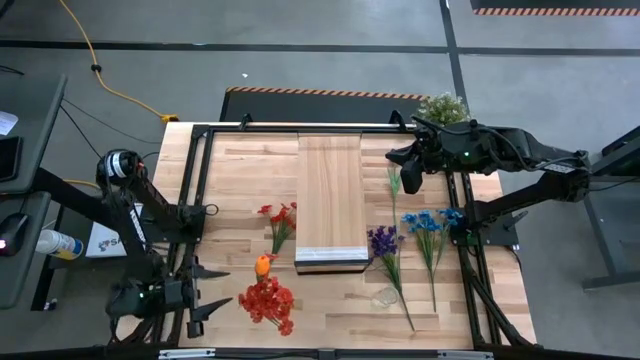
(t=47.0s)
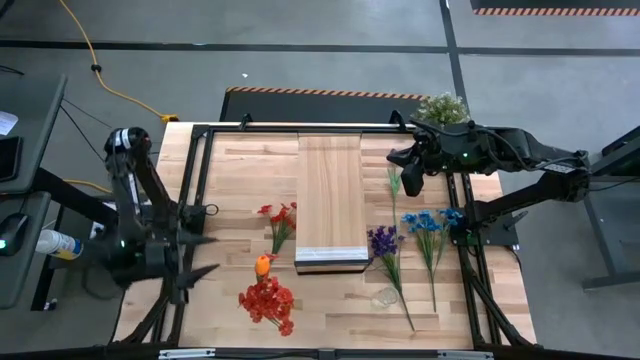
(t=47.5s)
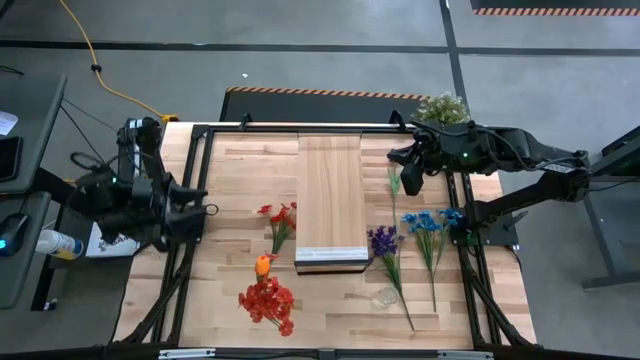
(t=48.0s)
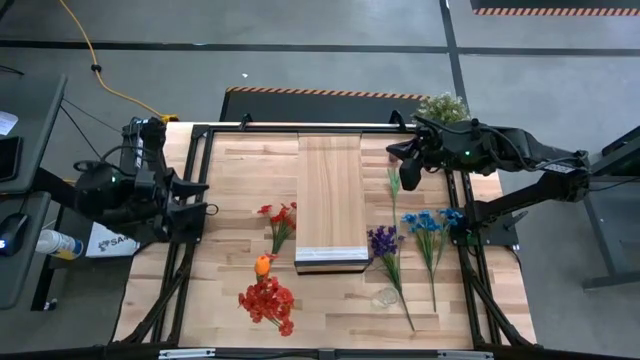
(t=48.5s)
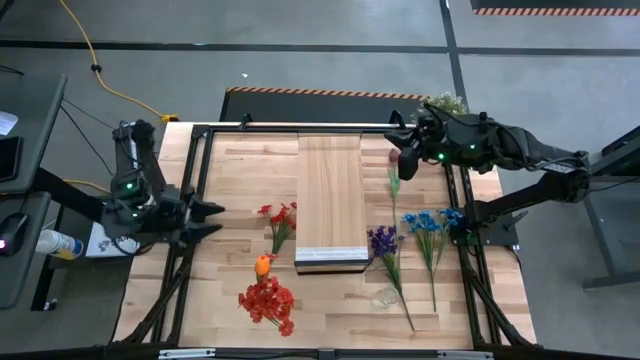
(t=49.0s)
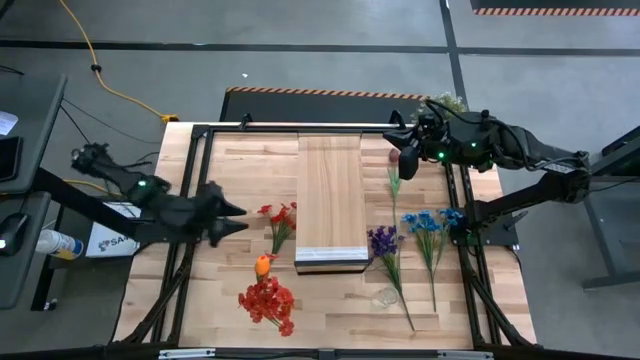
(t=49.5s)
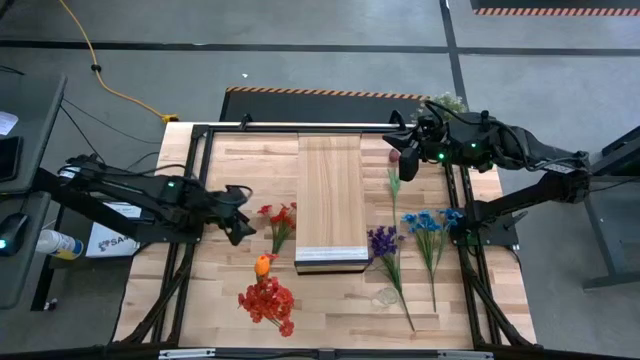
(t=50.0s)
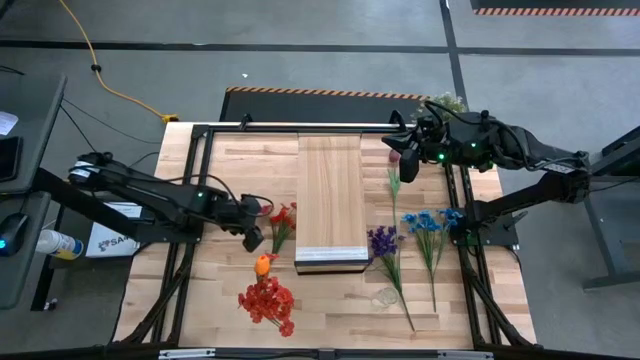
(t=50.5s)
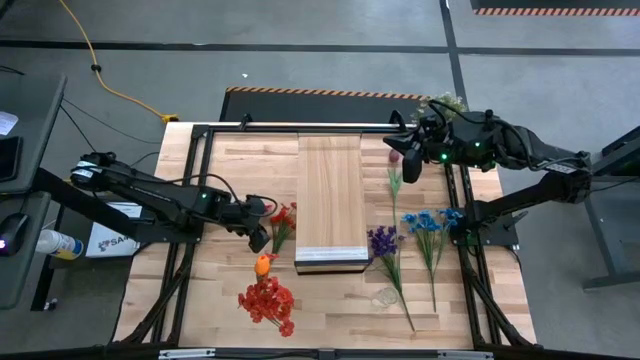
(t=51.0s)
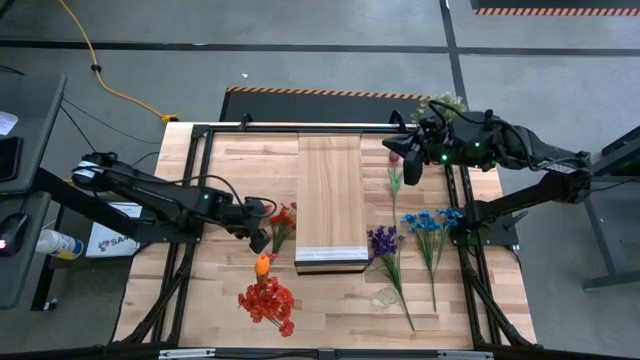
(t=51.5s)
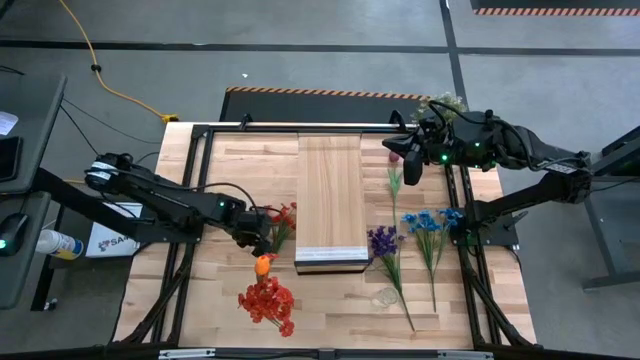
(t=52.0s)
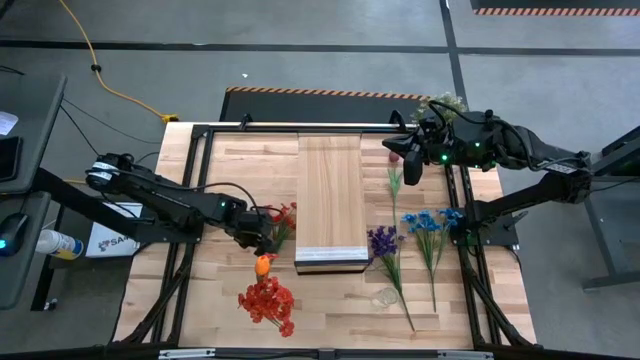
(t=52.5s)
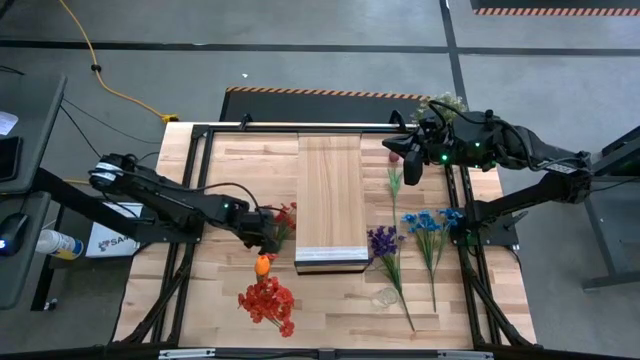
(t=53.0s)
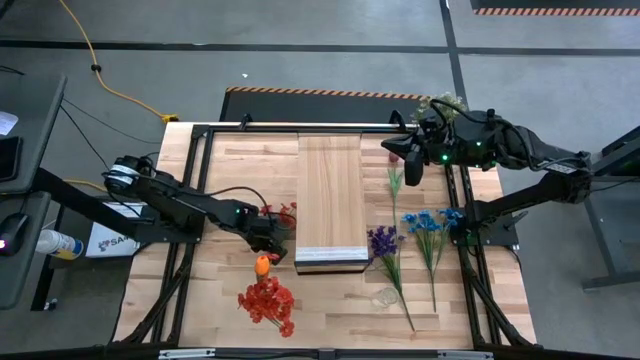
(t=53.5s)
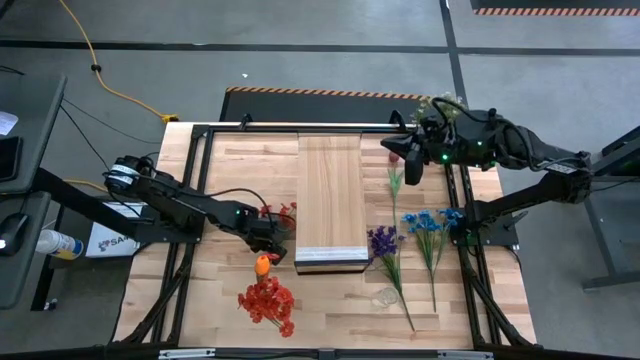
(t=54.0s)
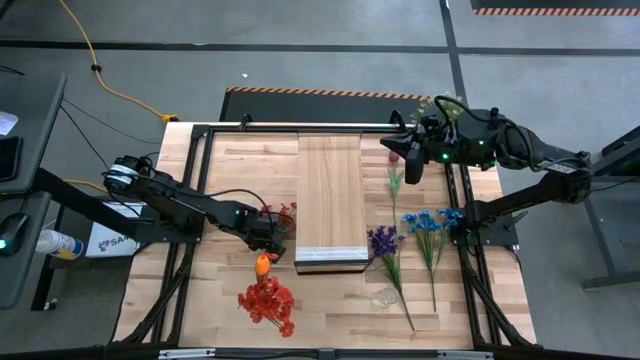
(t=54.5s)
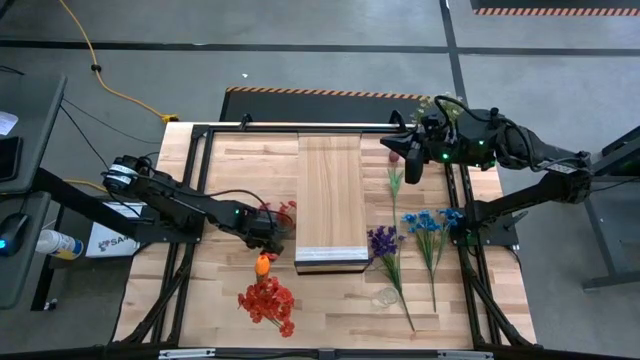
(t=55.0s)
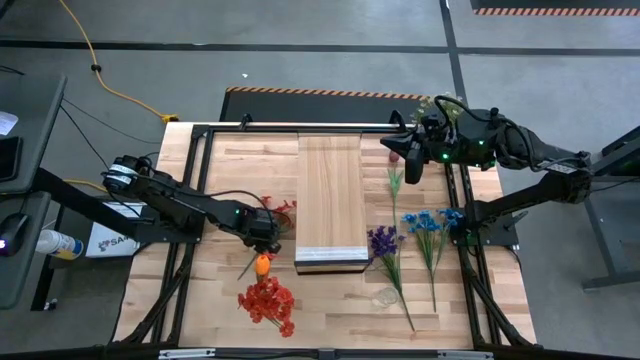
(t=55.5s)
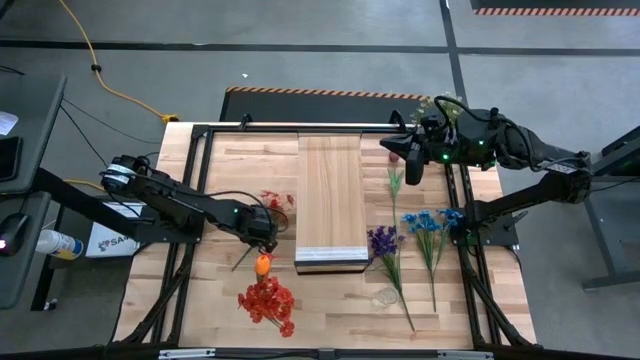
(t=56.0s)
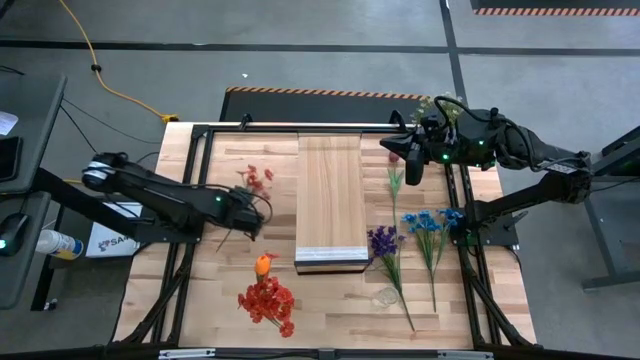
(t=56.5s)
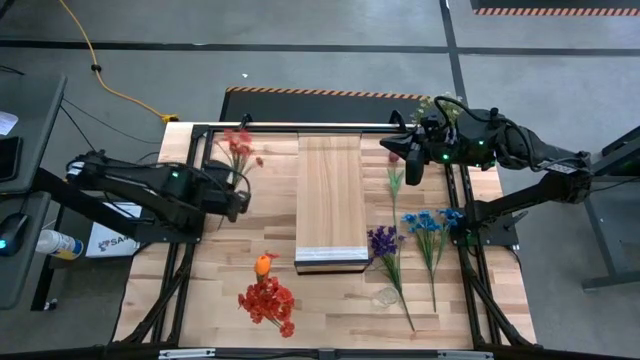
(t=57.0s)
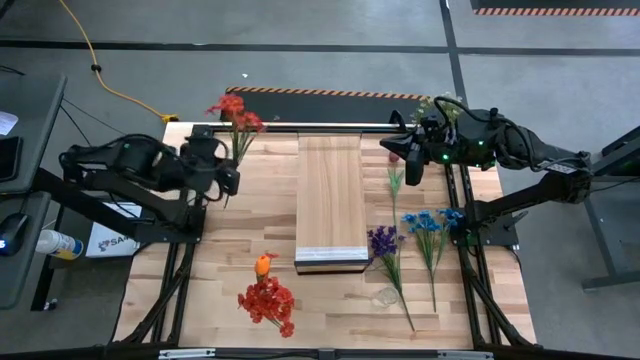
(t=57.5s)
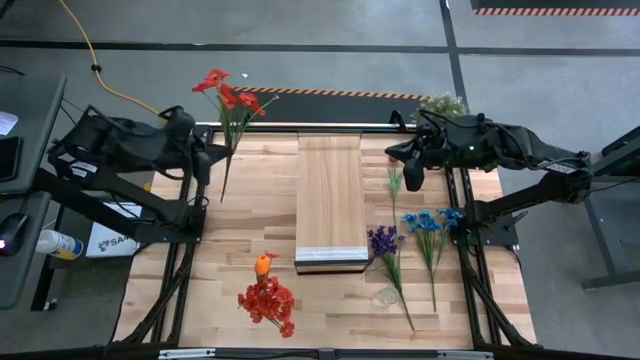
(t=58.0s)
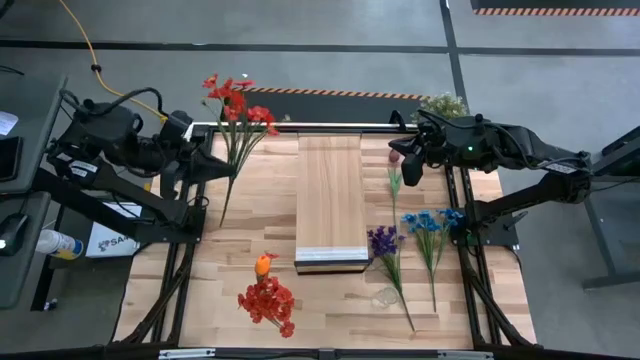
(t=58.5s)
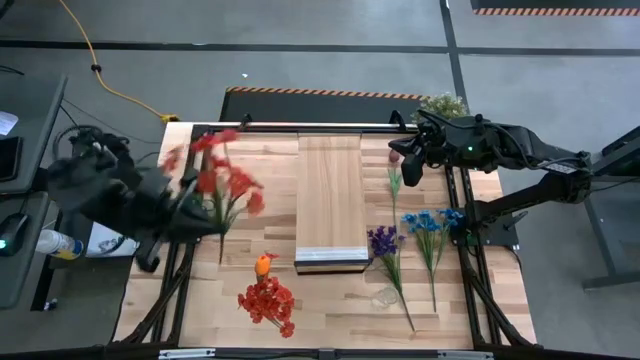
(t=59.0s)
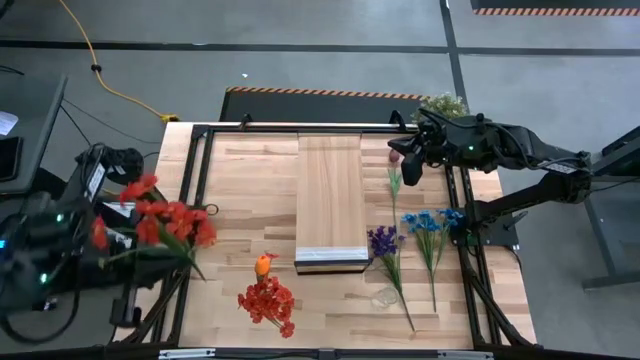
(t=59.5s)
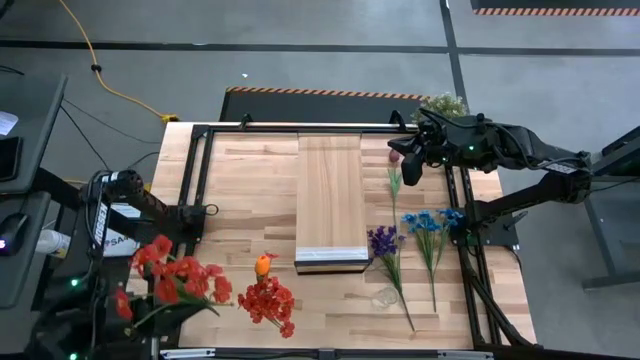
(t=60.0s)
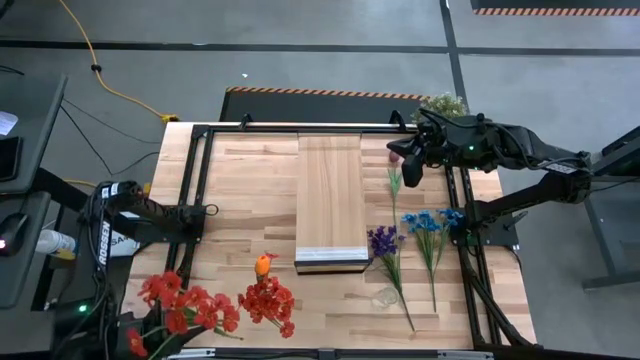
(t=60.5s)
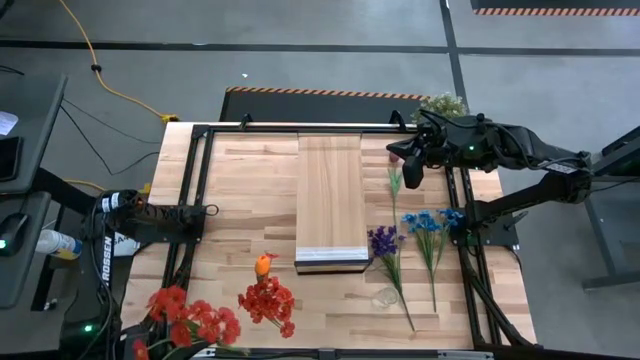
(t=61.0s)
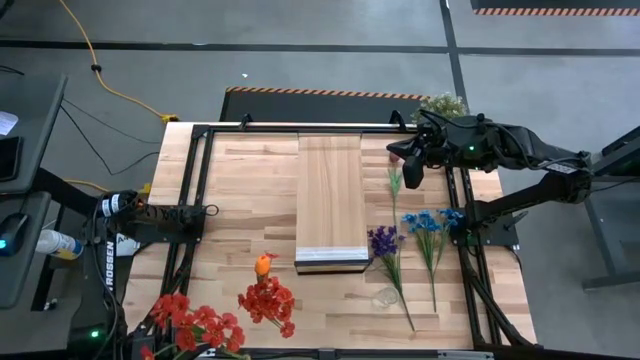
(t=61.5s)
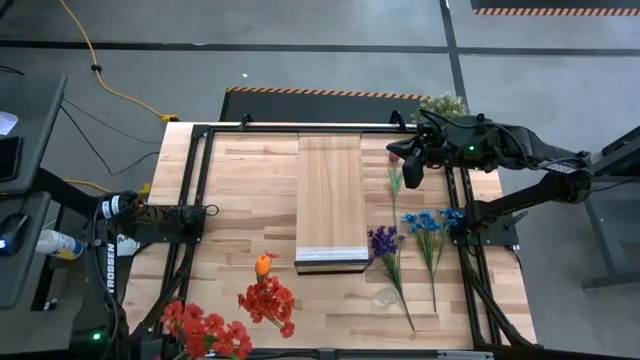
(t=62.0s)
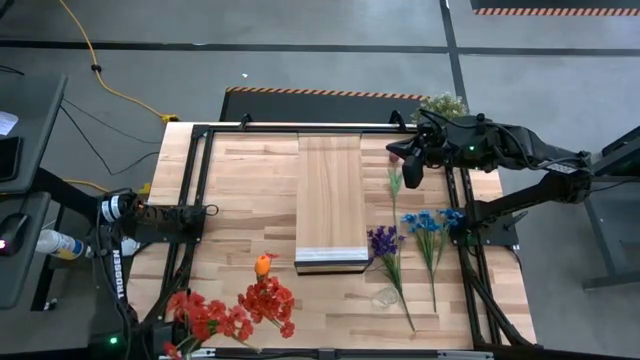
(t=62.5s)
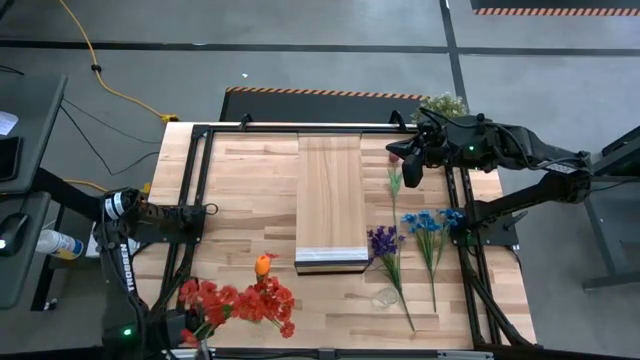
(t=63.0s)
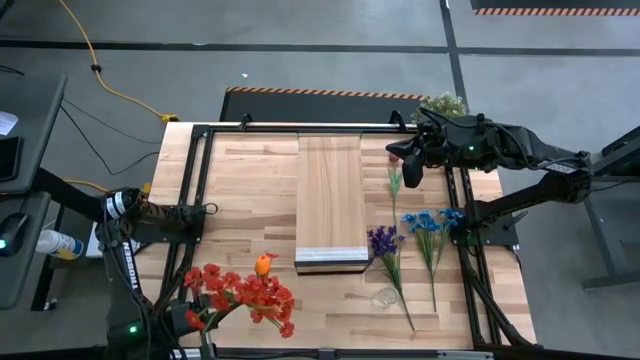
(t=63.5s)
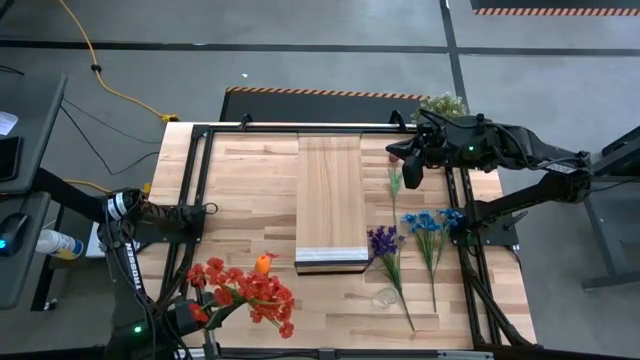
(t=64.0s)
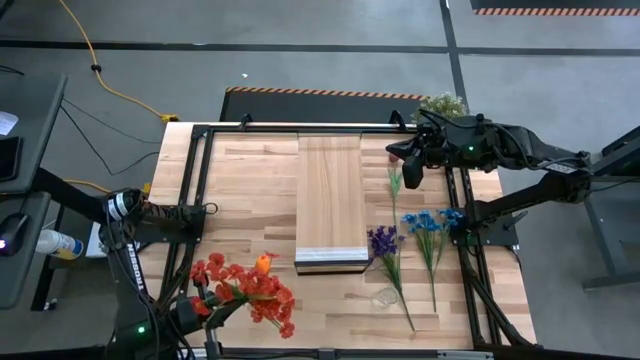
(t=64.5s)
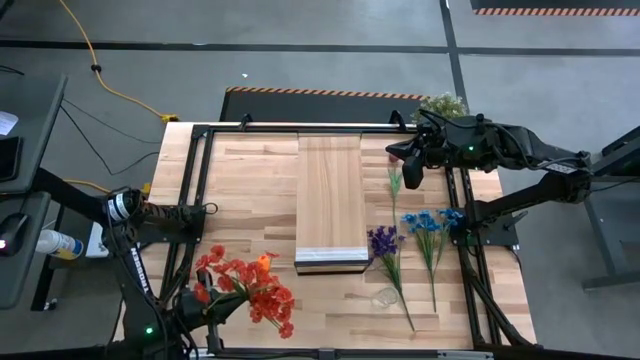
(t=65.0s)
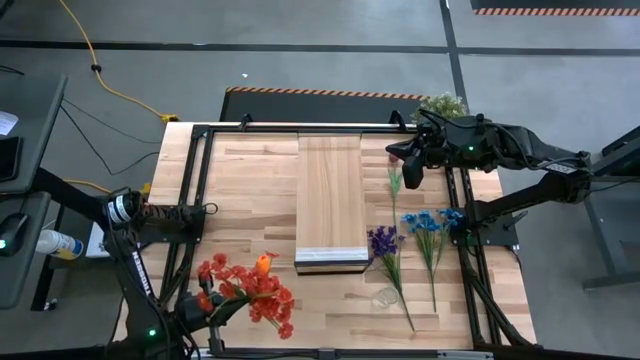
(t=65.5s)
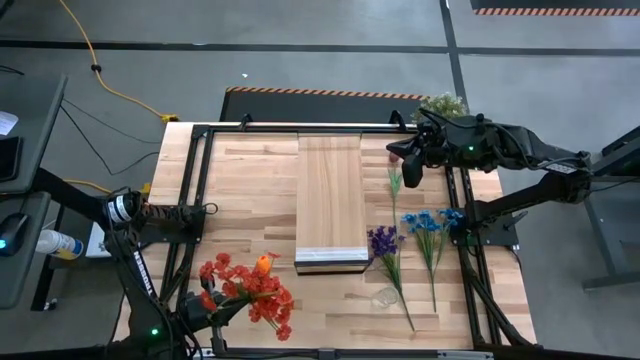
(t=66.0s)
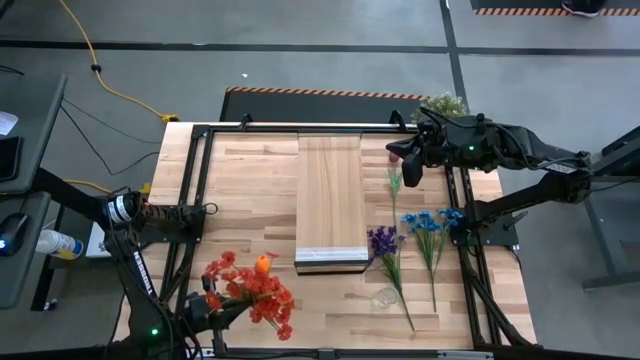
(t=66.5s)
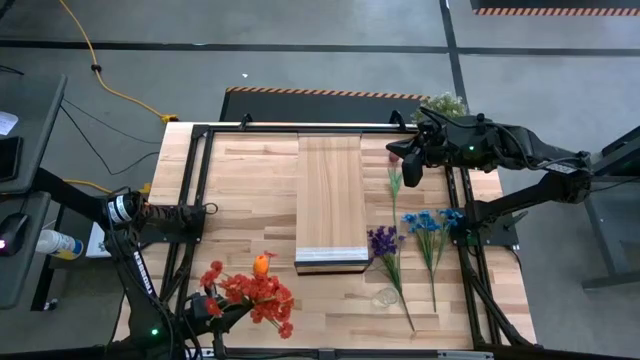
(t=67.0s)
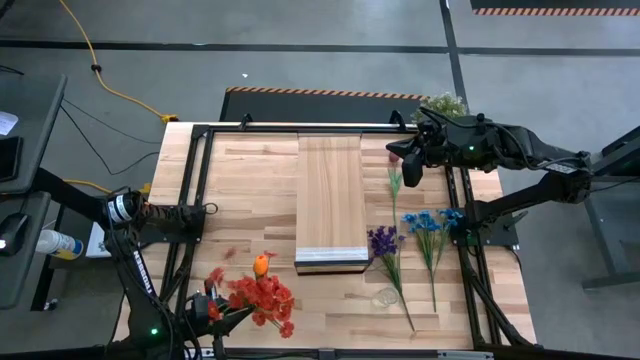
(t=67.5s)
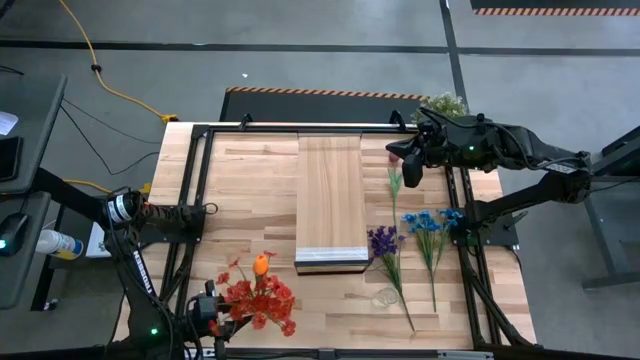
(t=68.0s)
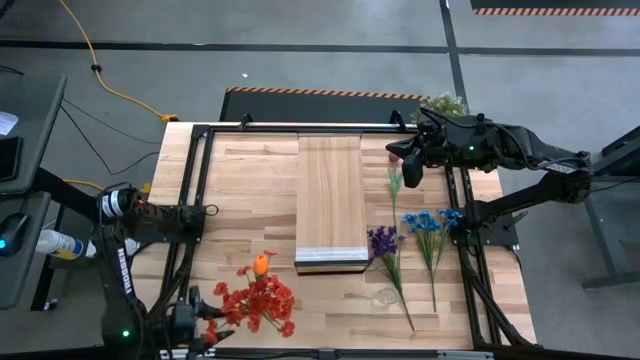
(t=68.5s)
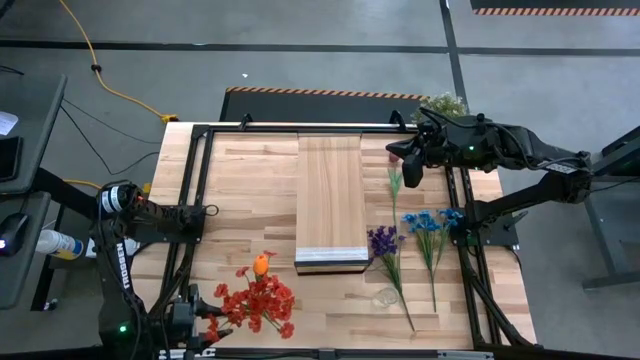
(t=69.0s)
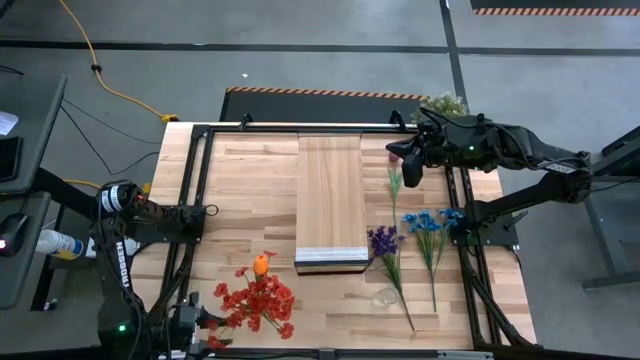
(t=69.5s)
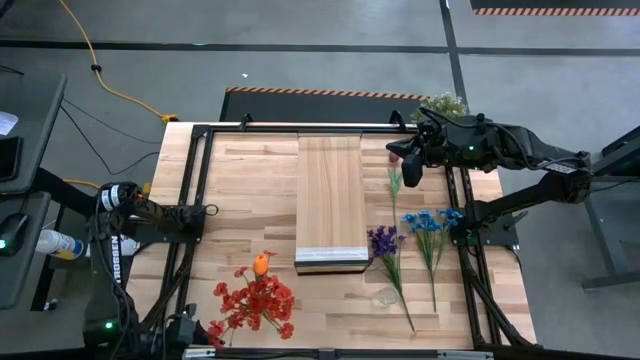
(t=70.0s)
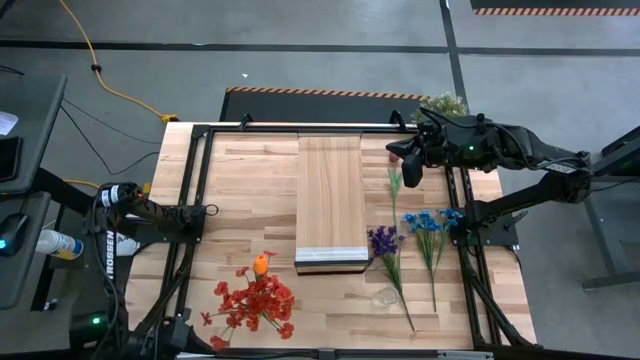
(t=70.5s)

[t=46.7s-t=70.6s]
Task: Pick and place flowers into a vace then onto a shelf
Put the red flowers into the left transparent vase
